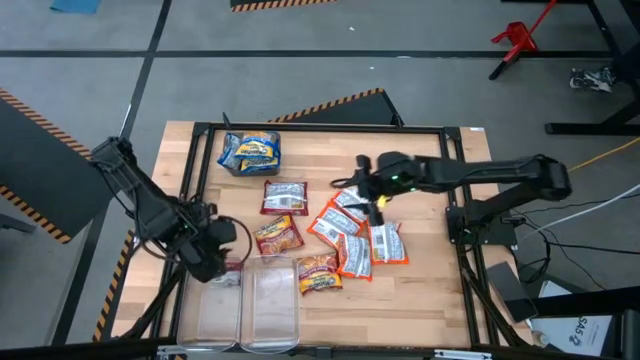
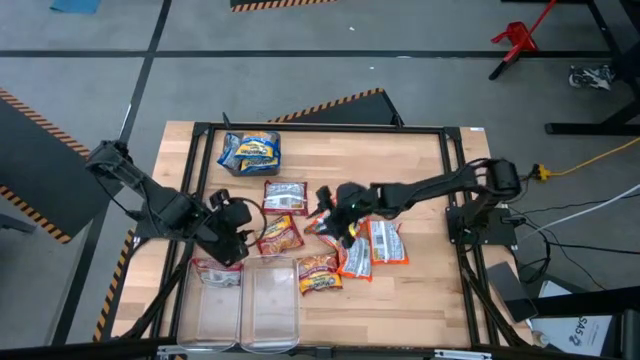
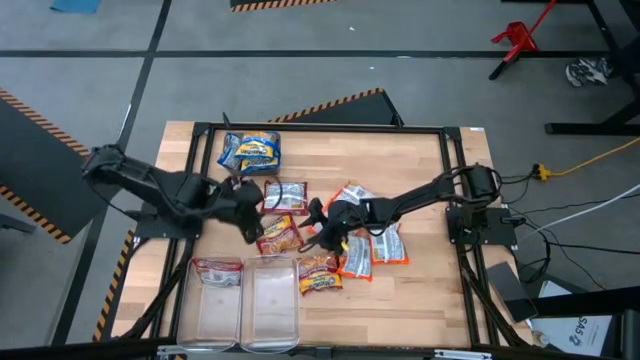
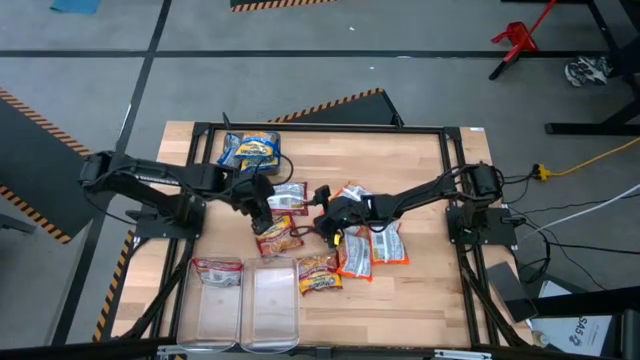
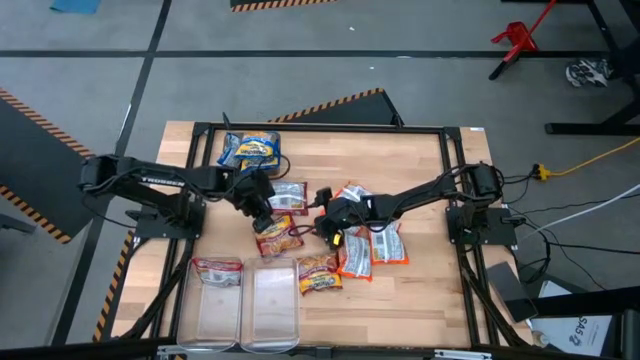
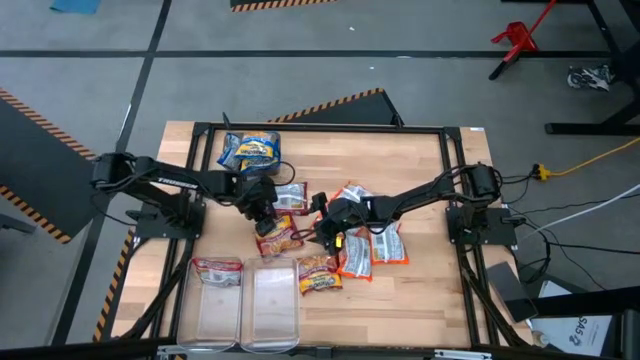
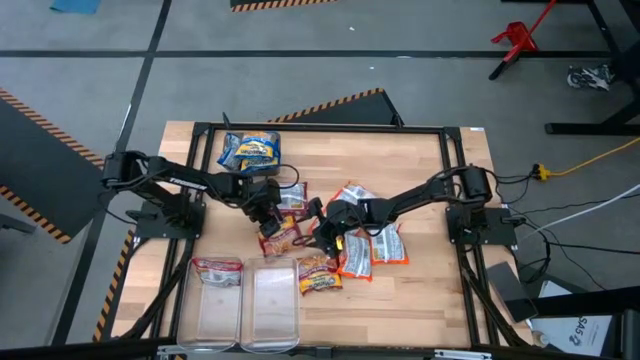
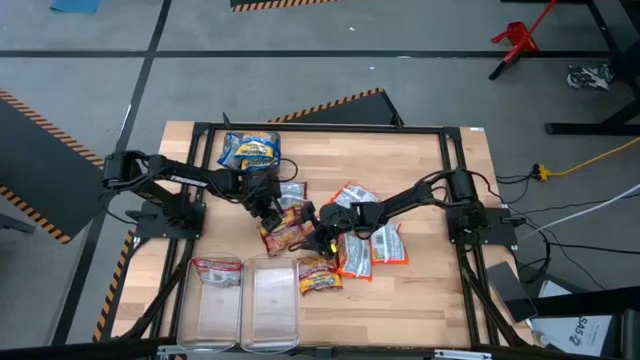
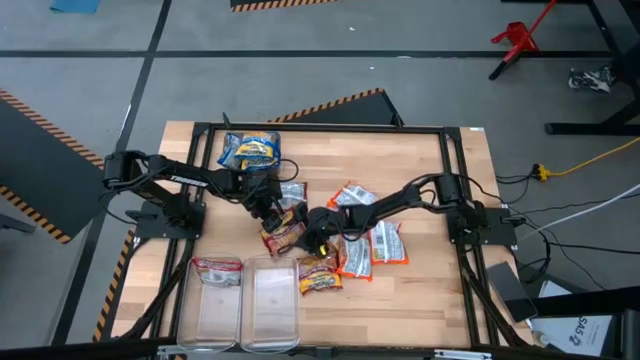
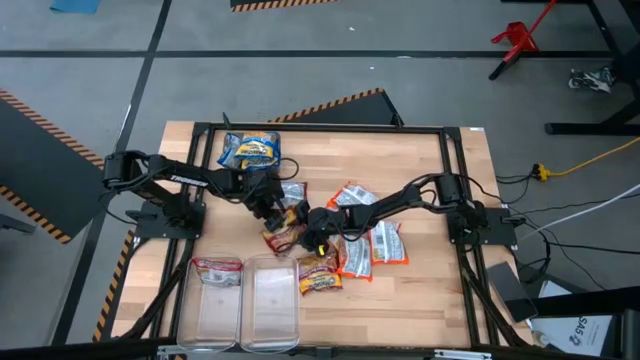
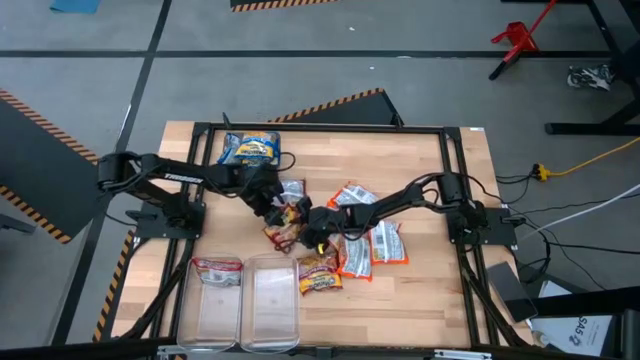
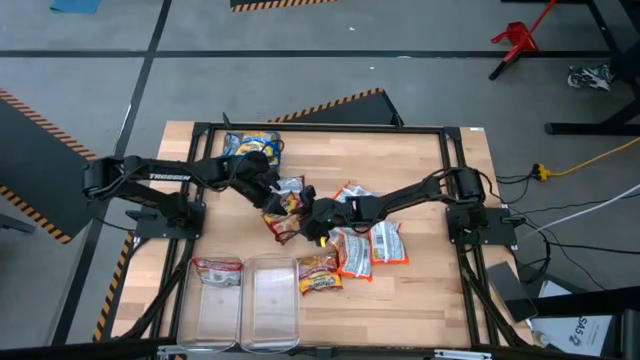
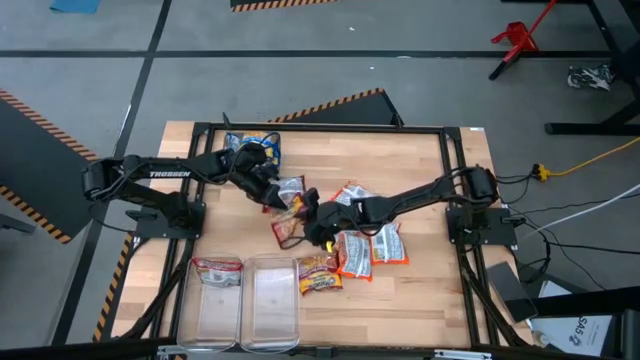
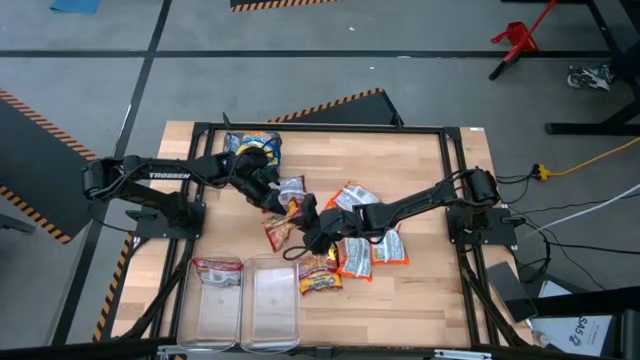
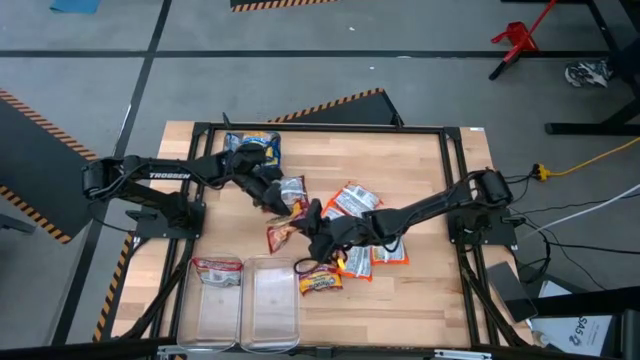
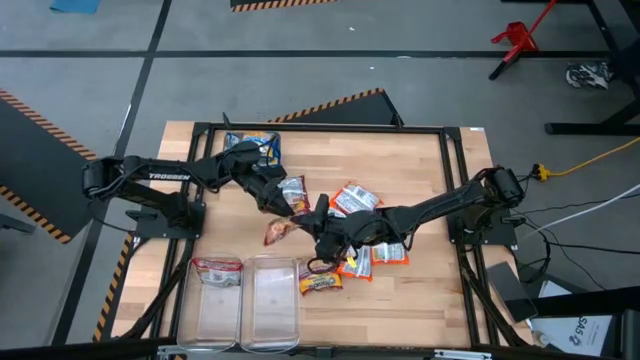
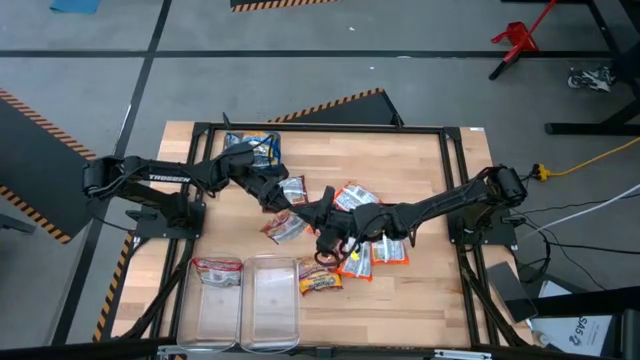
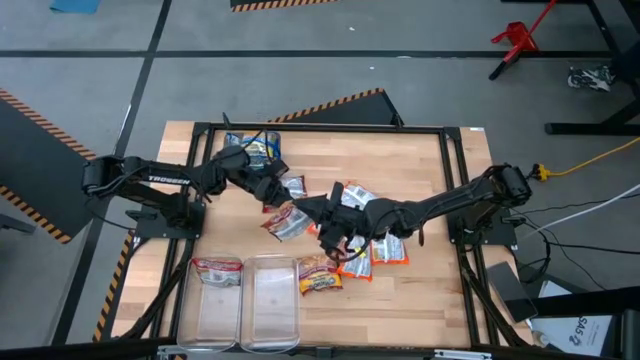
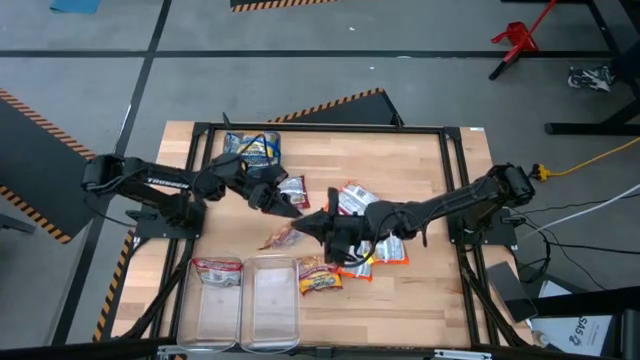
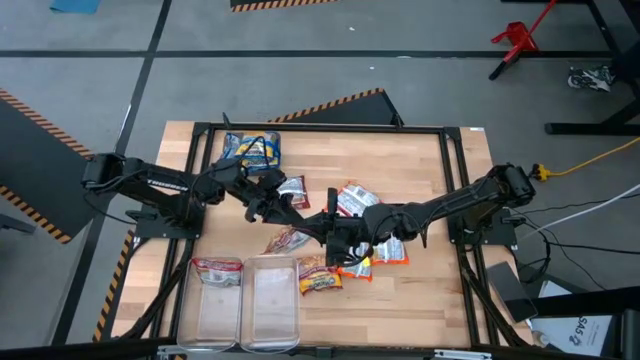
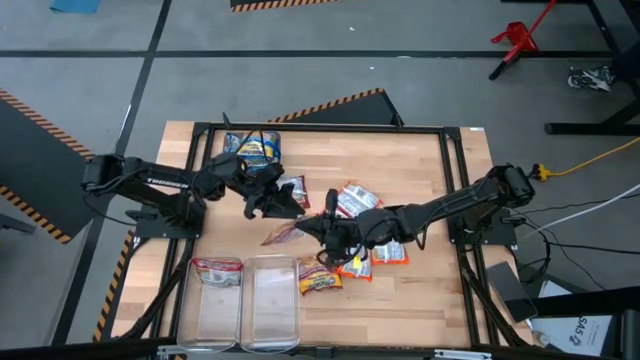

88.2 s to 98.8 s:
Task: Sort Maruchan noodles
Put the red noodle pack into the left transparent bin

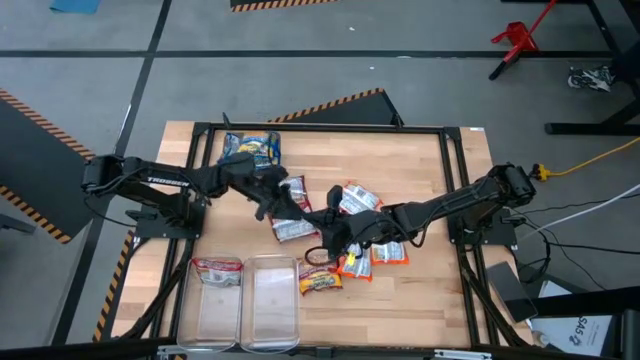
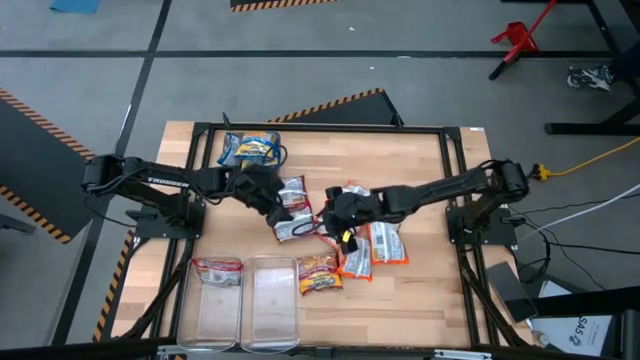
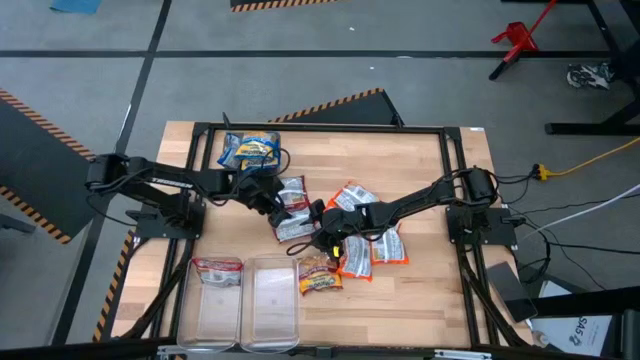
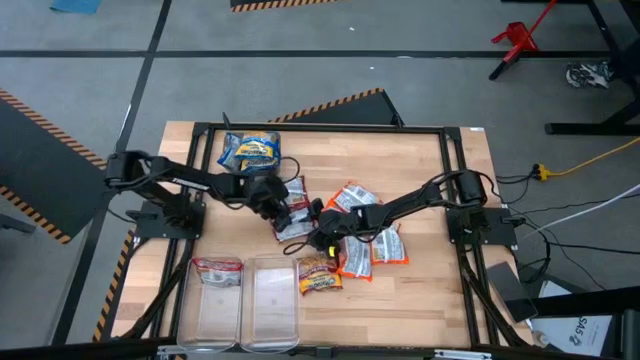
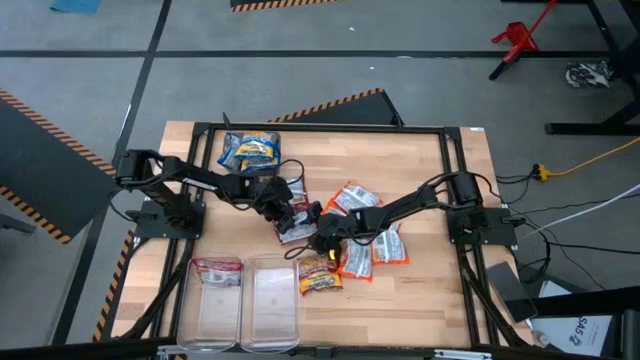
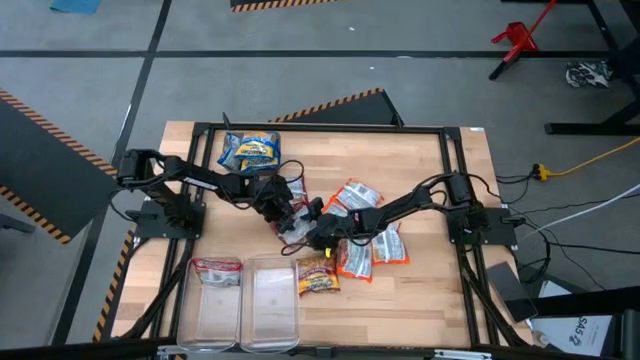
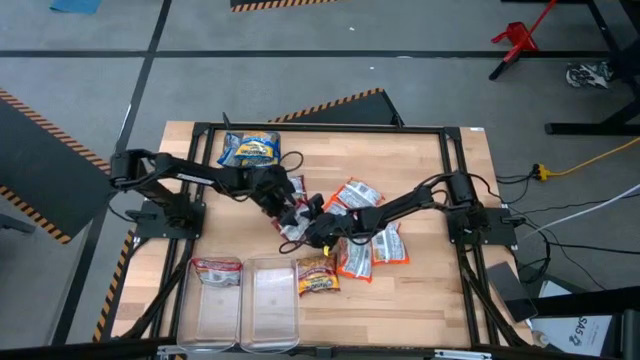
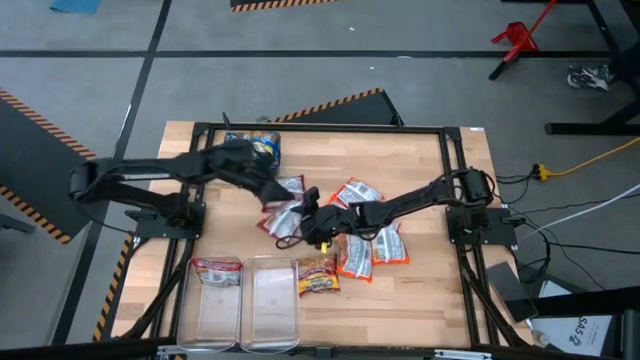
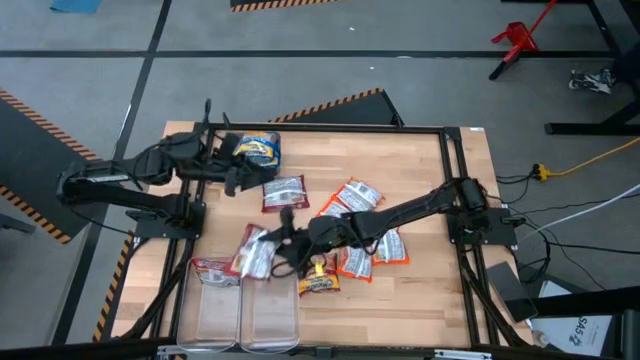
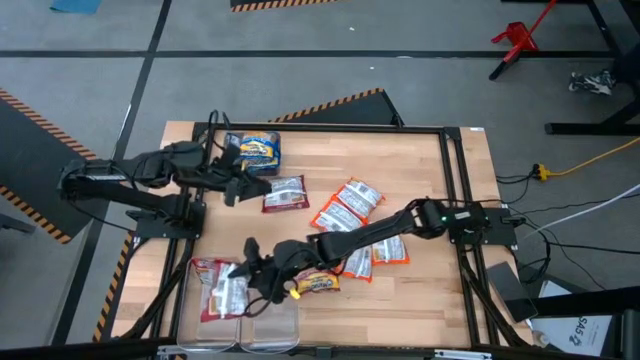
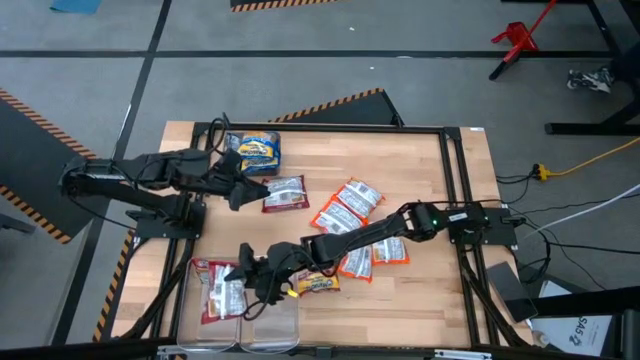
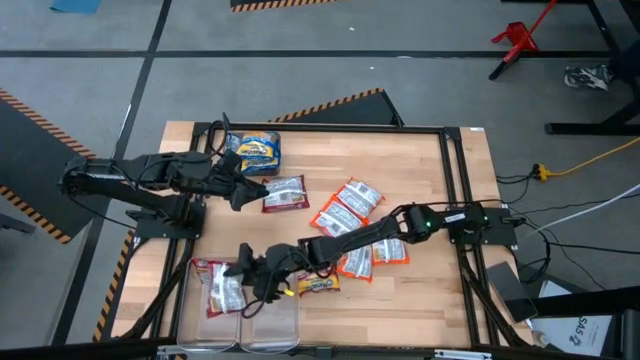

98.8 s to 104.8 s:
Put the red noodle pack into the left transparent bin

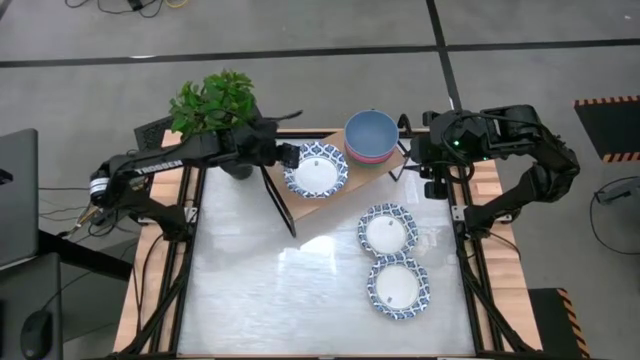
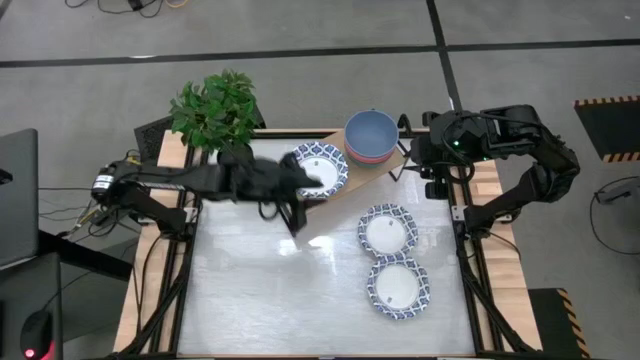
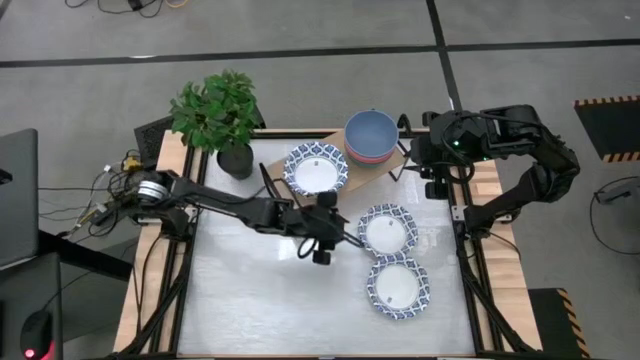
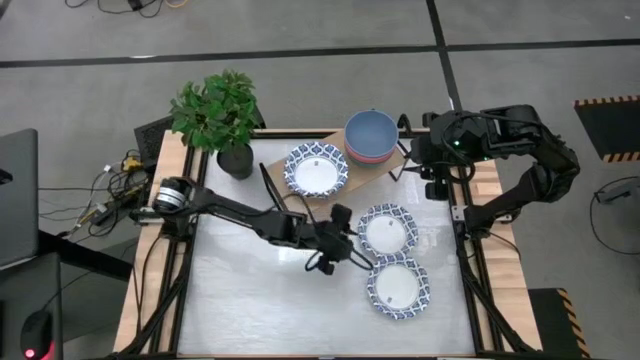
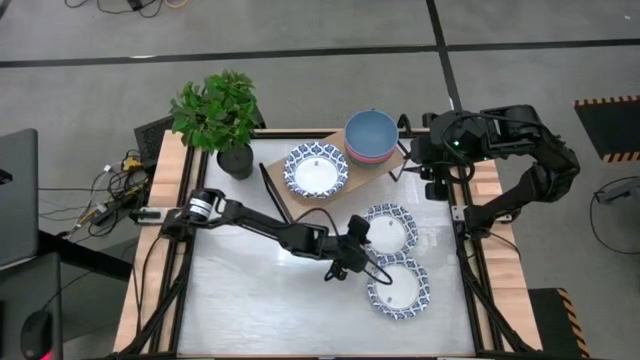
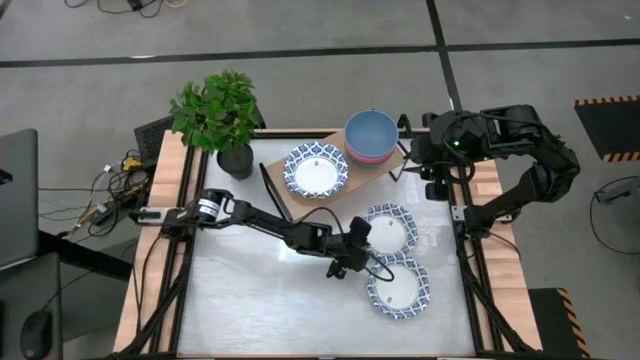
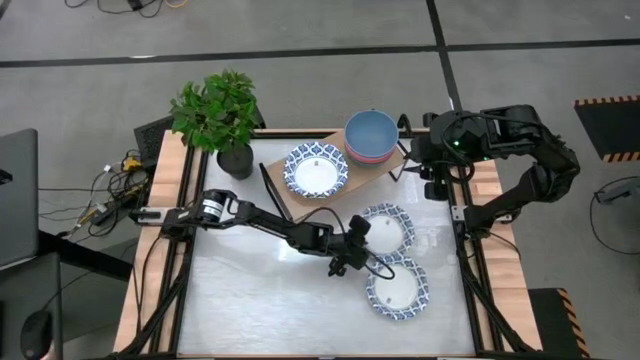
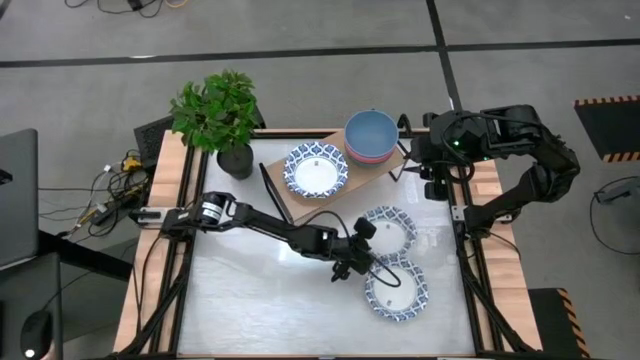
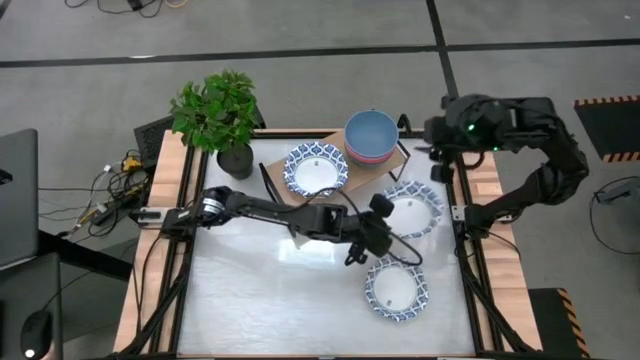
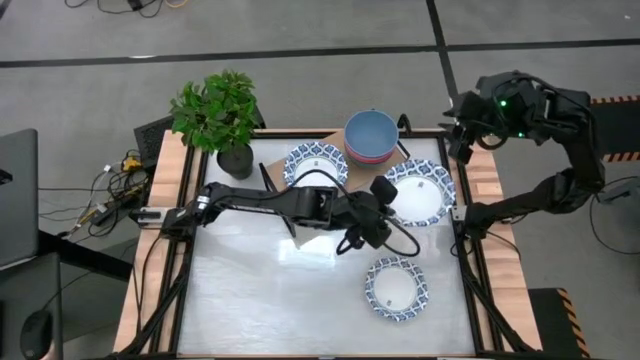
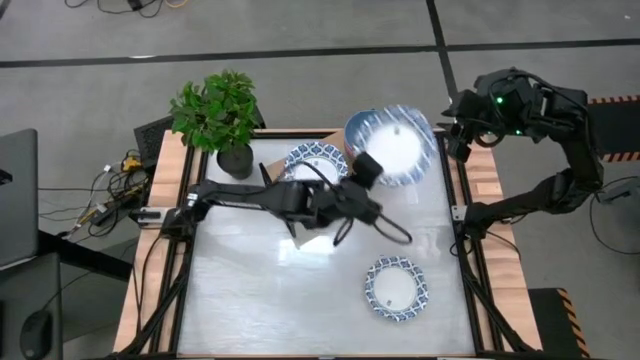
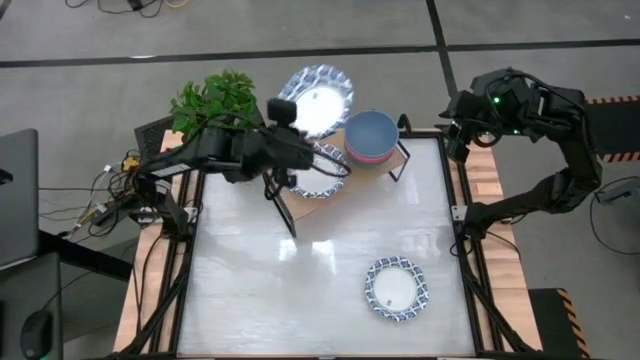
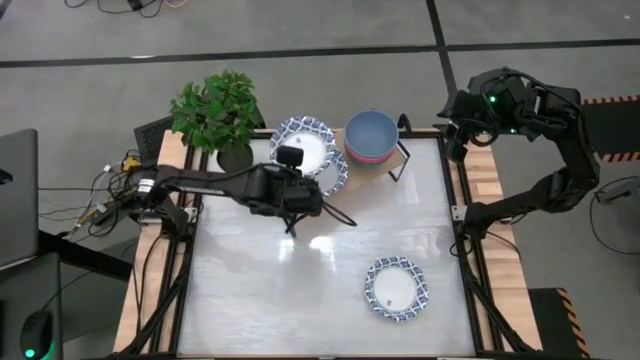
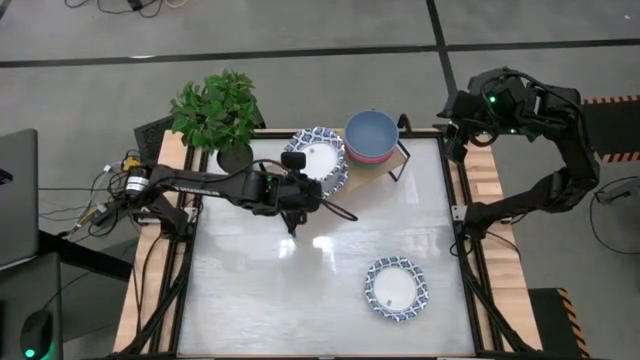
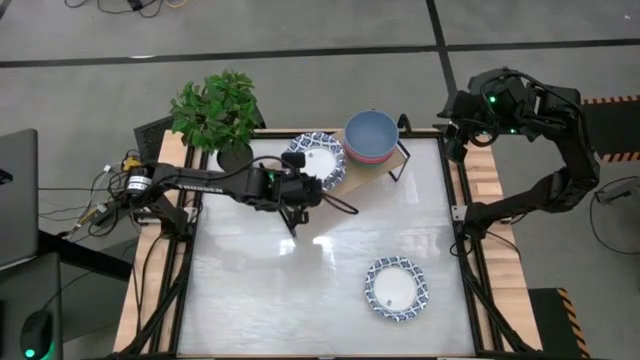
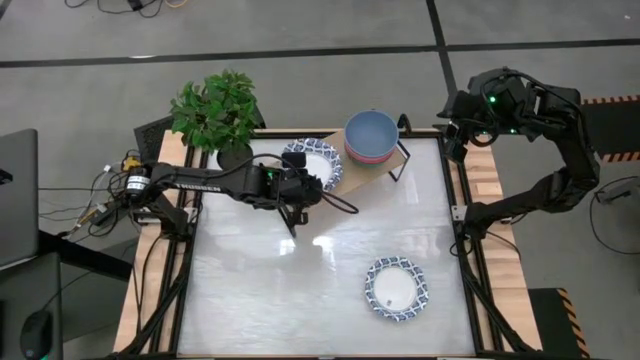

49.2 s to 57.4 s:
Task: Place and stack bowls onto a shelf
Stack the white and blue patterned bowl on the white and blue patterned bowl on the shelf
